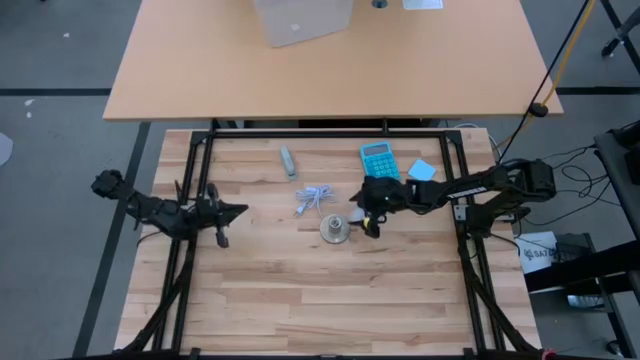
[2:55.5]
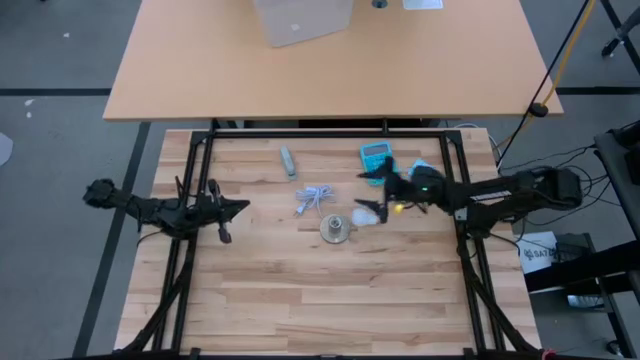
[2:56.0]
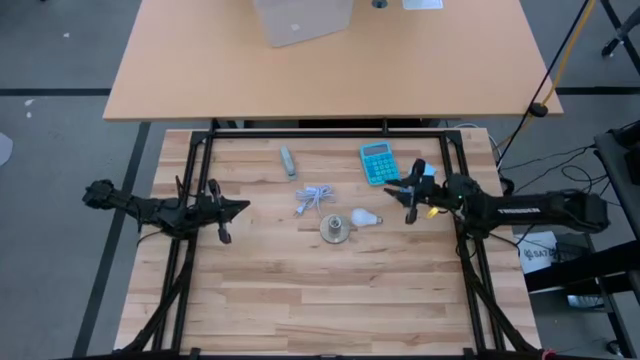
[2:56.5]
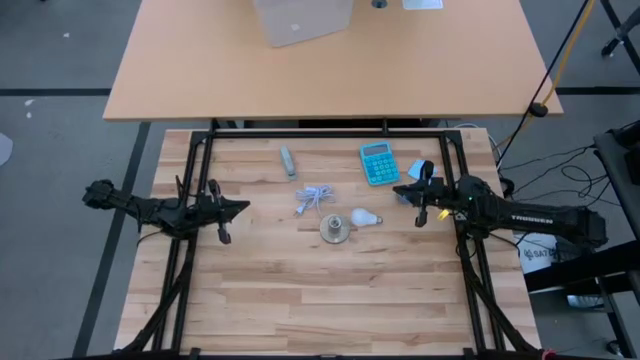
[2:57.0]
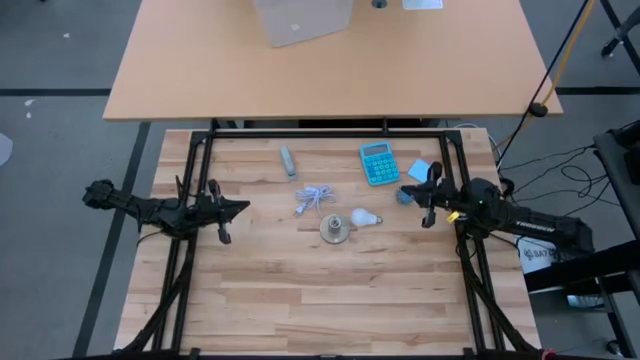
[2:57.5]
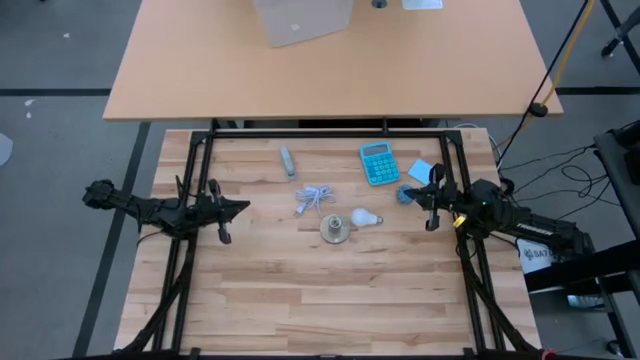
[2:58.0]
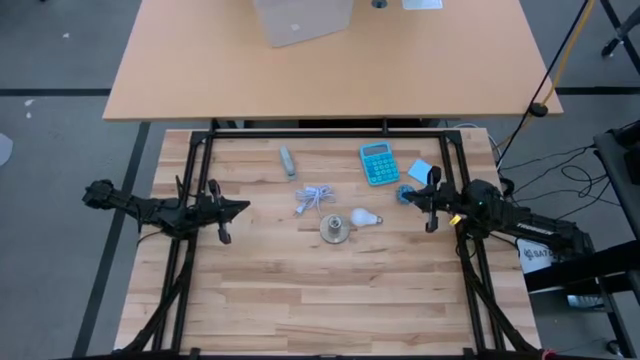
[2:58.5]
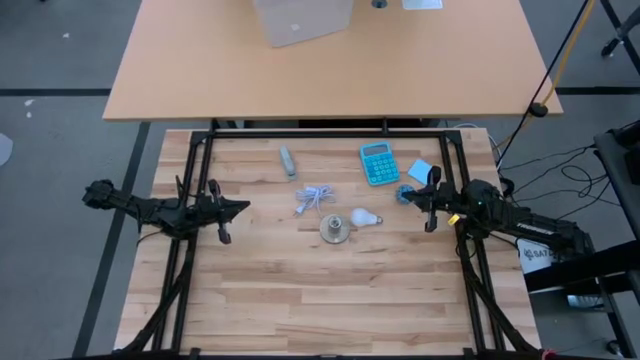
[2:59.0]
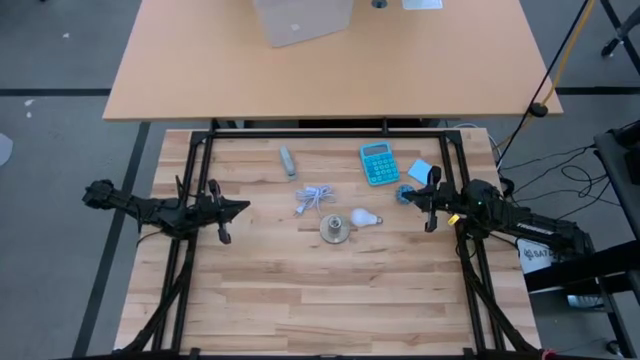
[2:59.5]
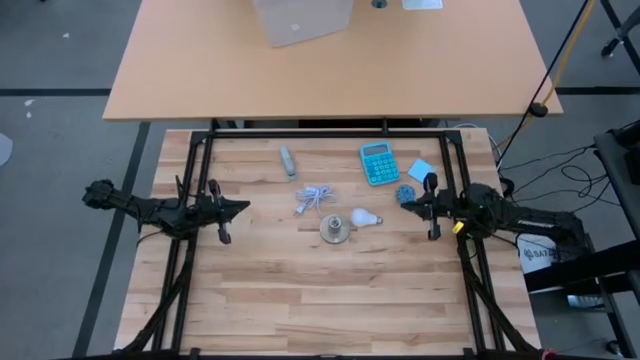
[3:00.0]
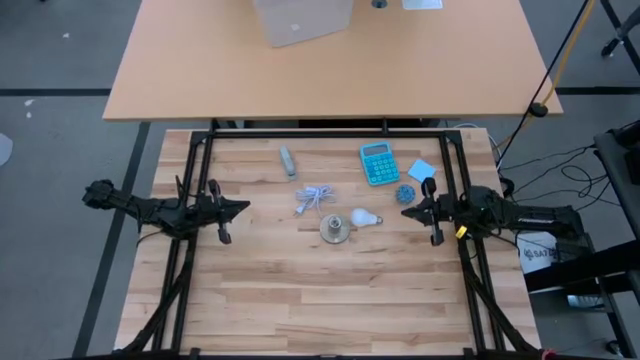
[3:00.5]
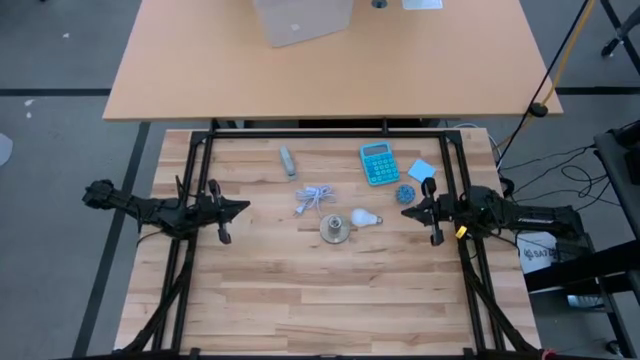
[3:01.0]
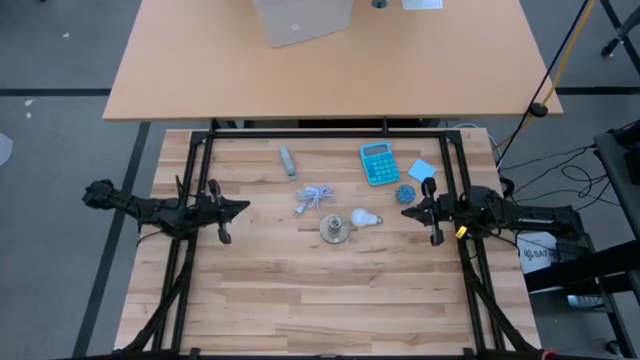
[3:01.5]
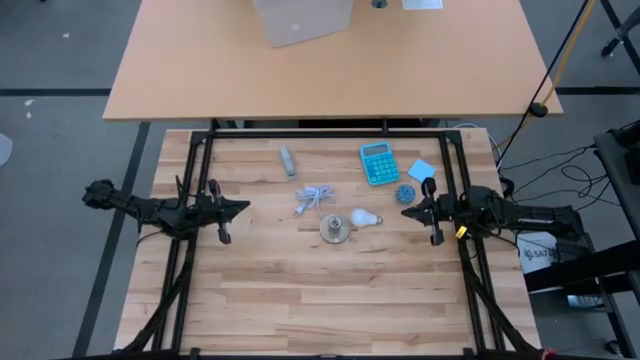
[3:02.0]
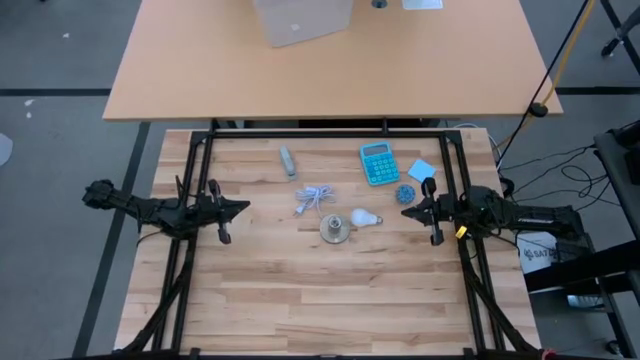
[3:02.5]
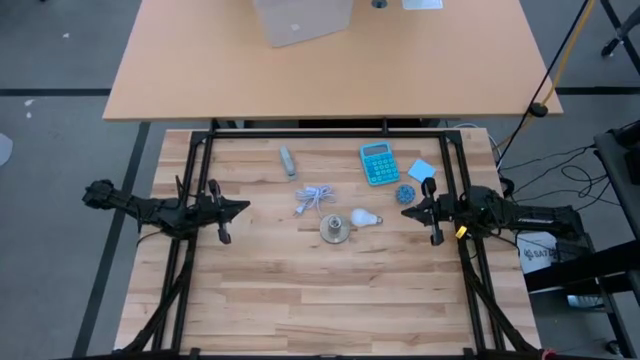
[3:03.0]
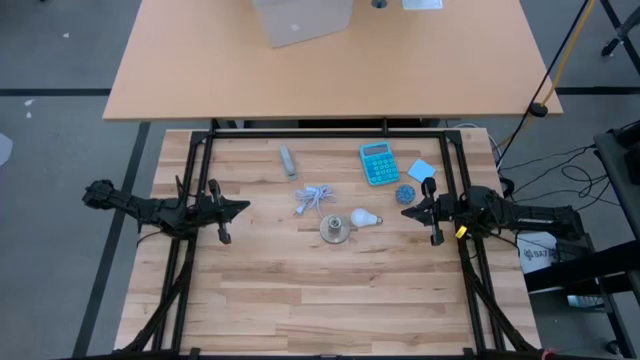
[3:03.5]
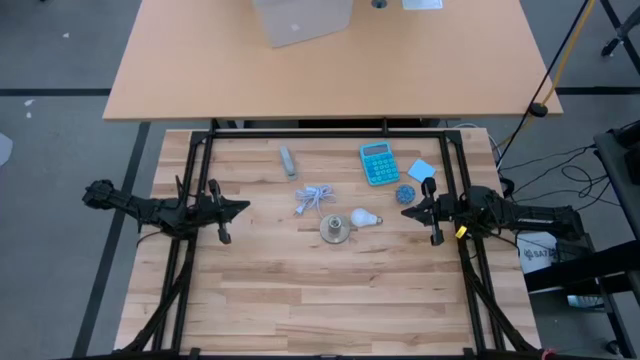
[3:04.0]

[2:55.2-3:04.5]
Task: Screw lightbulb
Return to Home Position

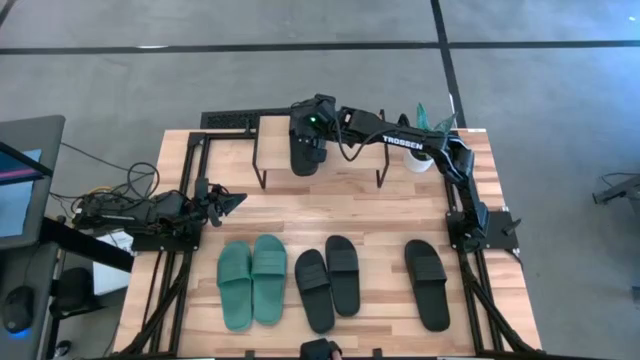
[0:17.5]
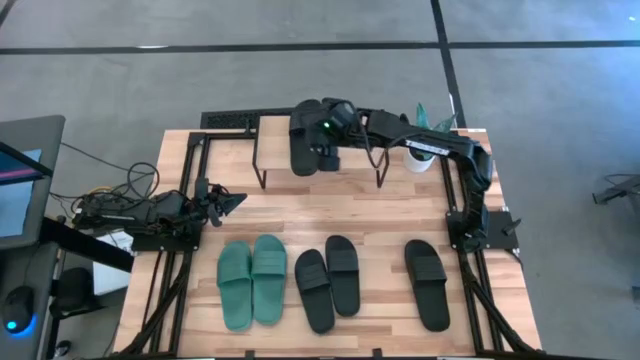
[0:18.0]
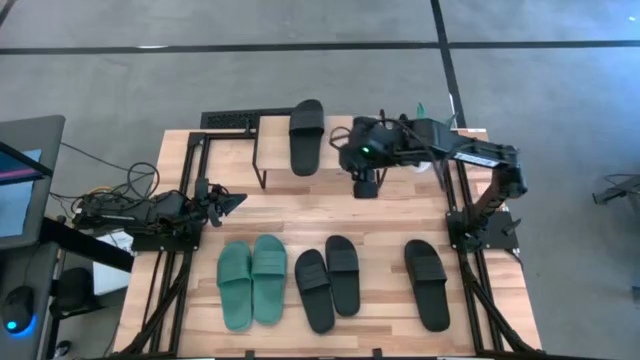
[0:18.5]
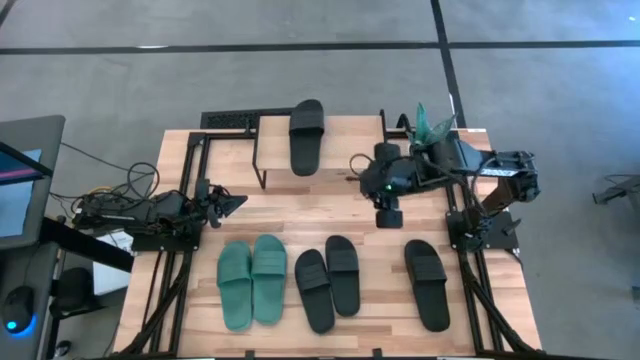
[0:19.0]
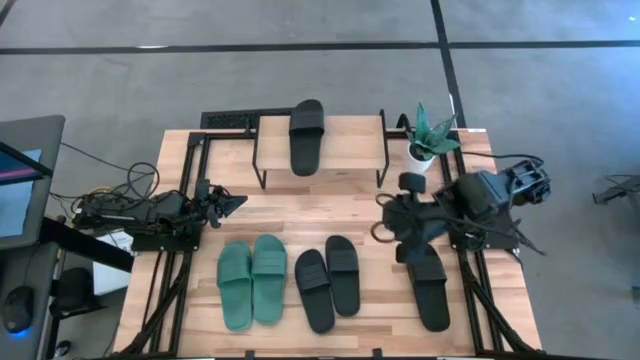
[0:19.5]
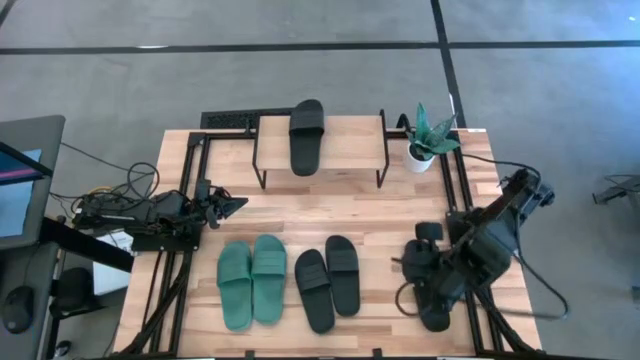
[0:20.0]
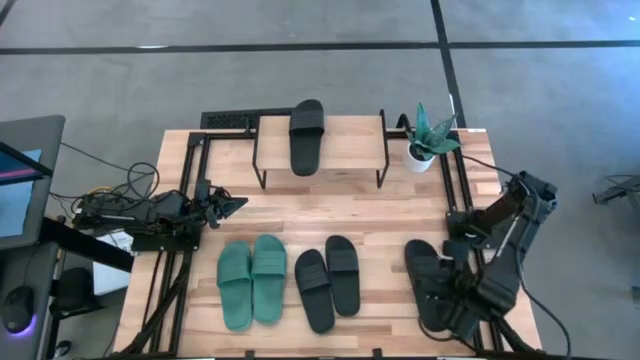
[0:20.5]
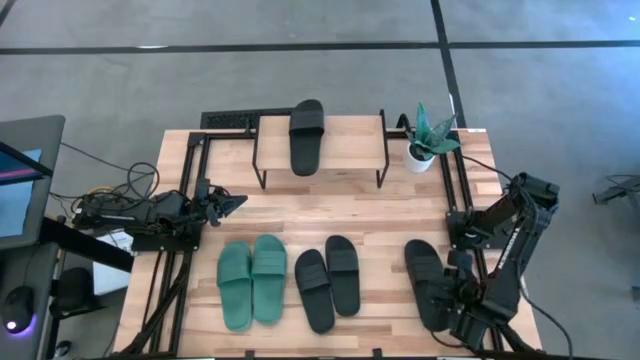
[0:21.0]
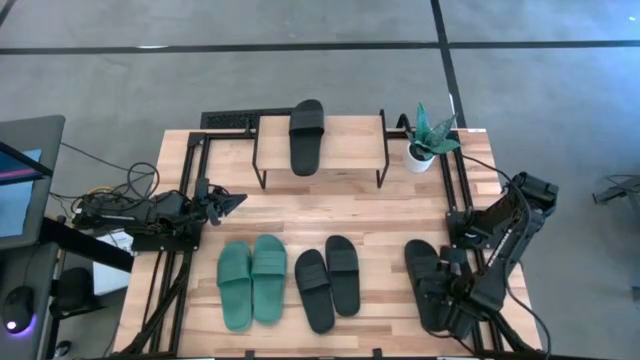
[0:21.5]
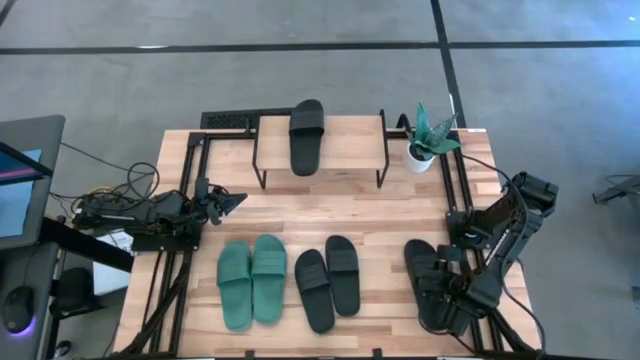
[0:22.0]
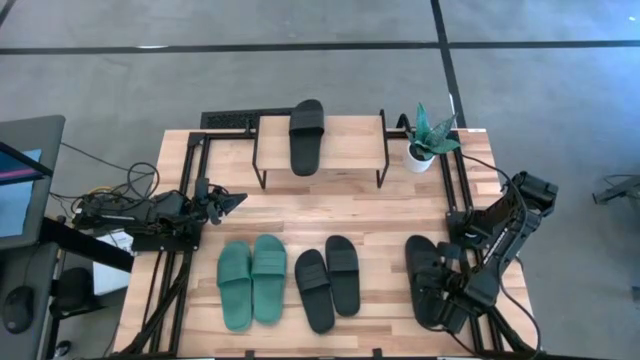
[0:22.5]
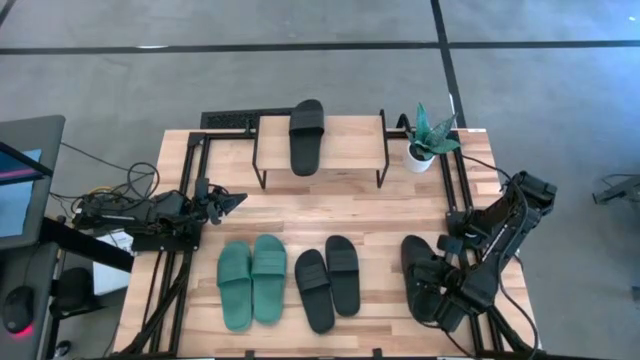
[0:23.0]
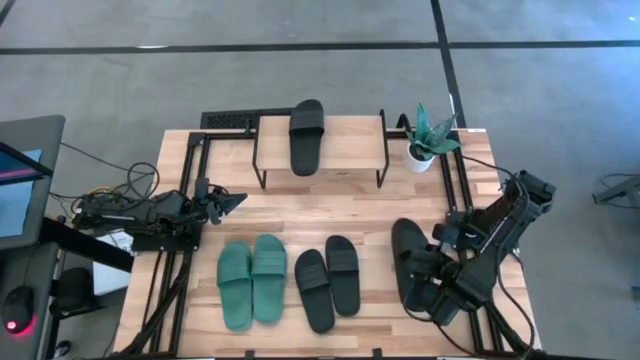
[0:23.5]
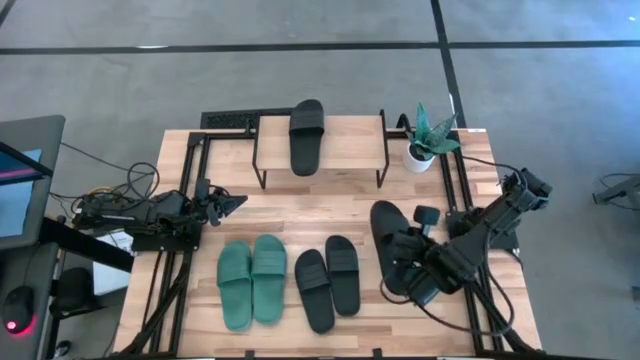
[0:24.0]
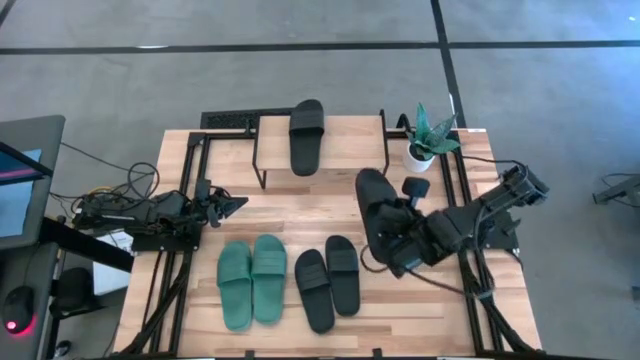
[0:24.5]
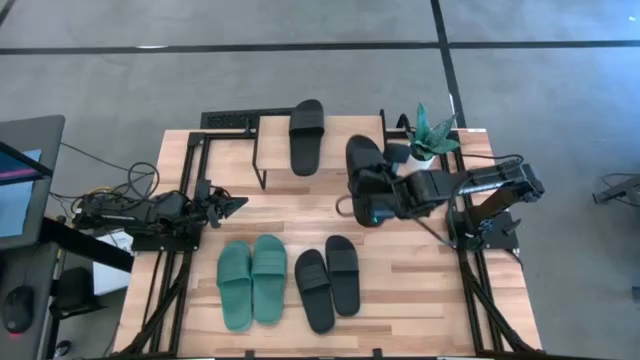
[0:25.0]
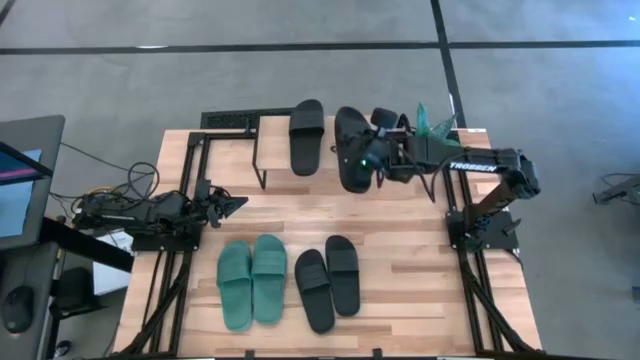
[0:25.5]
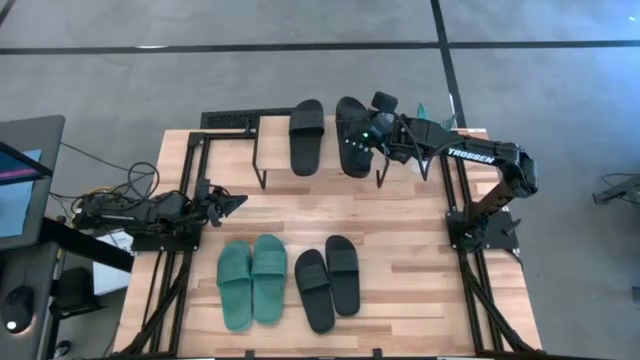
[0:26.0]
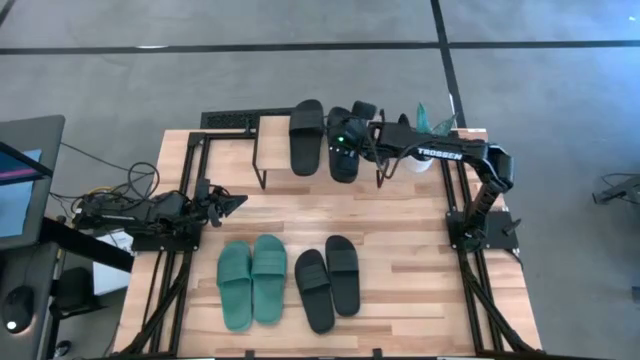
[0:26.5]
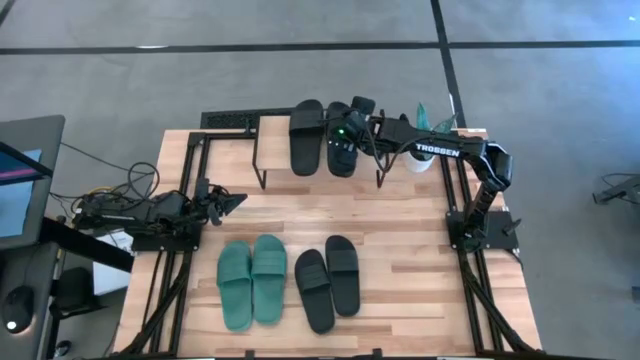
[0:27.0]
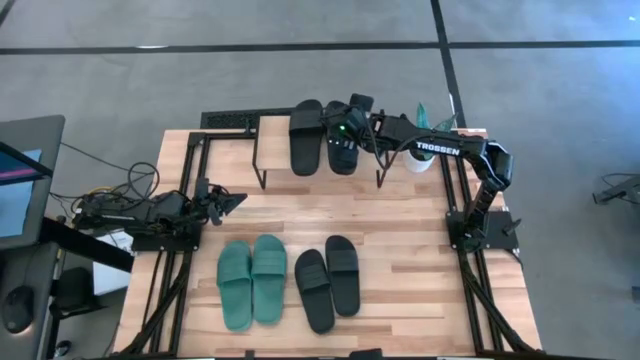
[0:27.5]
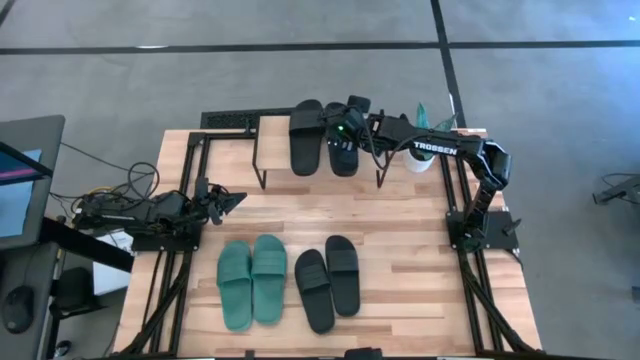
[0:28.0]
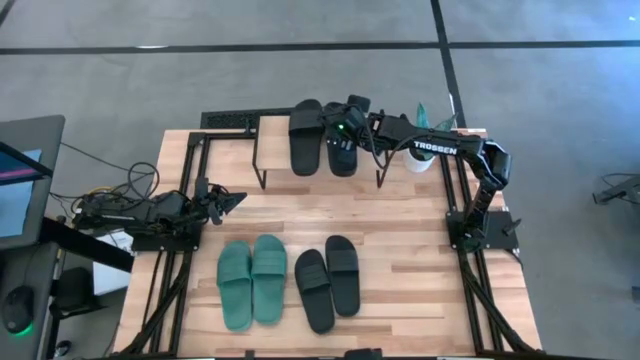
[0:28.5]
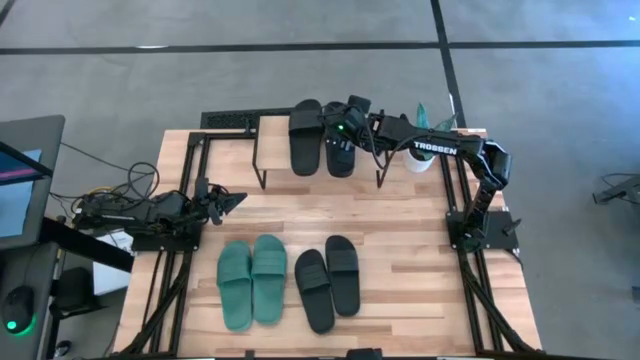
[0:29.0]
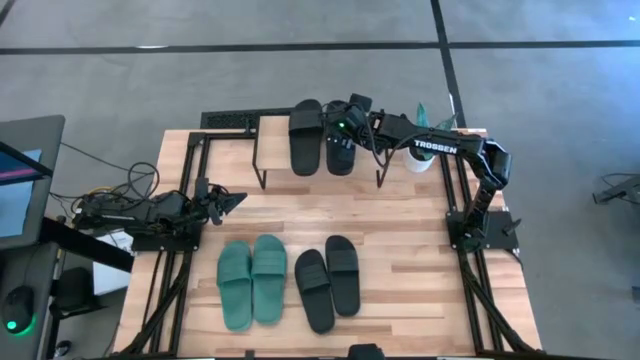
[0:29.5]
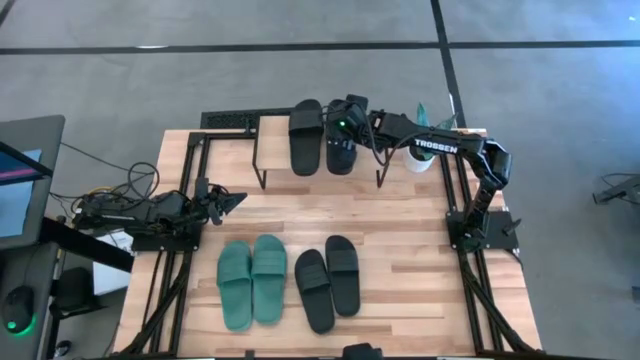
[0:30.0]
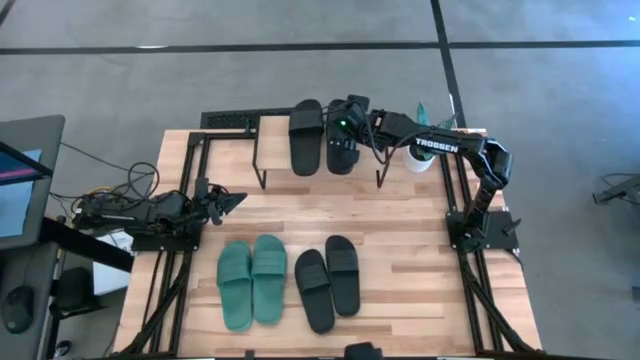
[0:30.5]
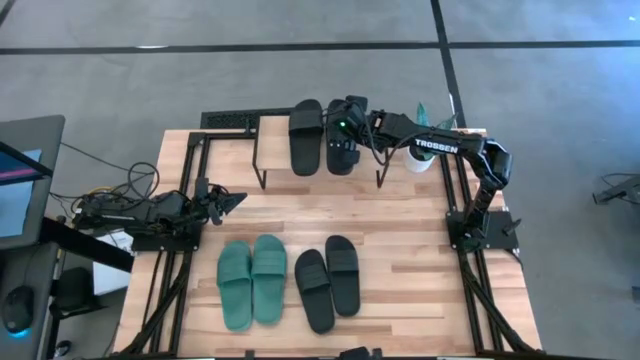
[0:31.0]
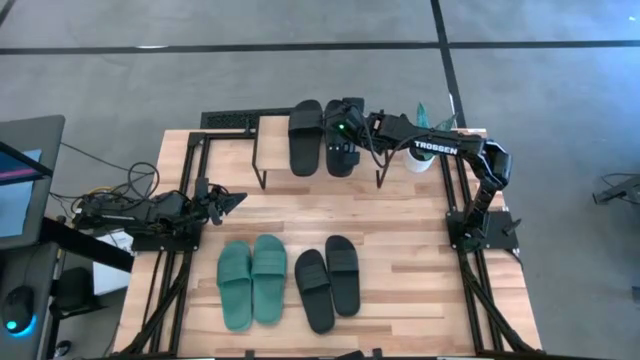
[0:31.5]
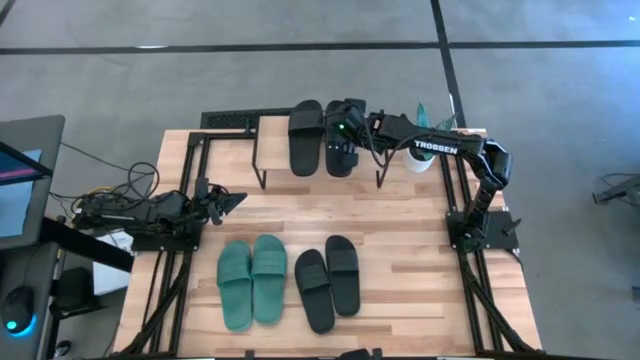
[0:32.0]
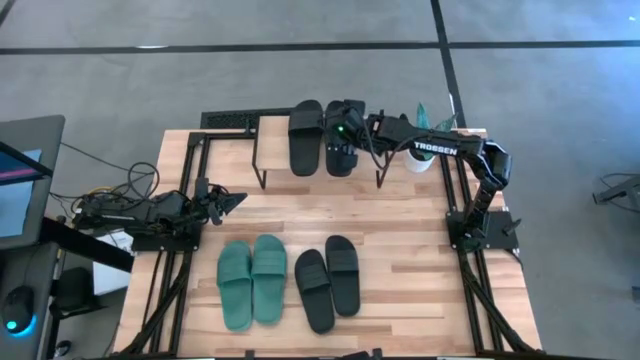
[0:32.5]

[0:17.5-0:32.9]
Task: Pick and place slides into the shelf
Put the black slide on the shelf
